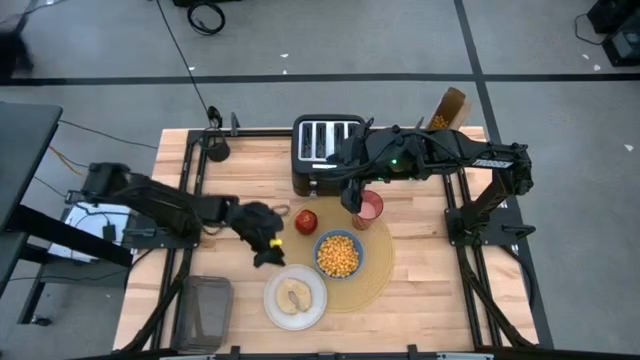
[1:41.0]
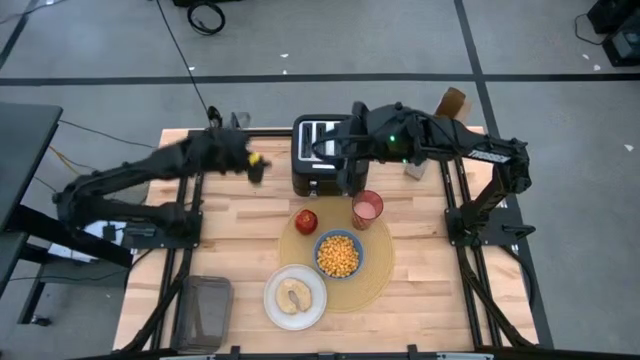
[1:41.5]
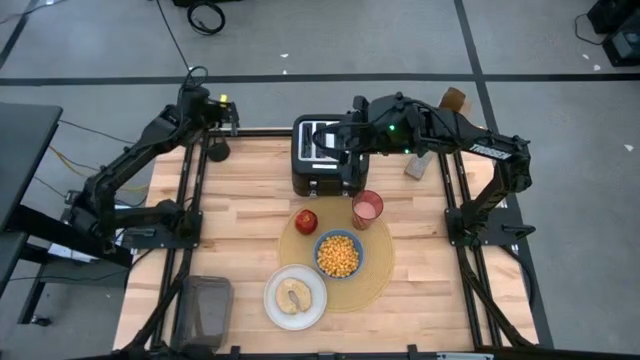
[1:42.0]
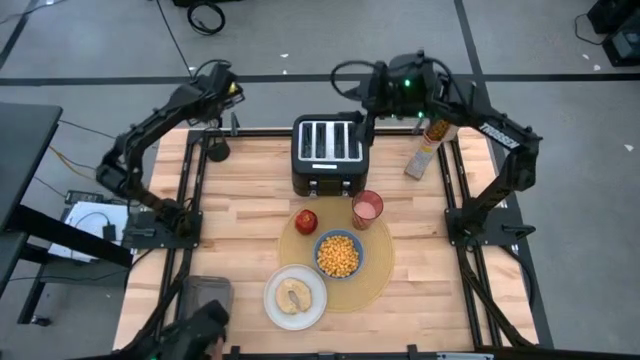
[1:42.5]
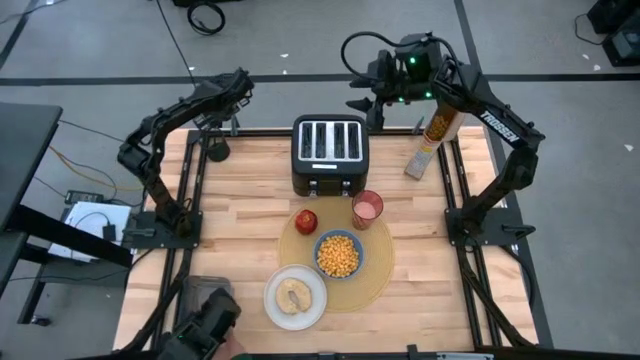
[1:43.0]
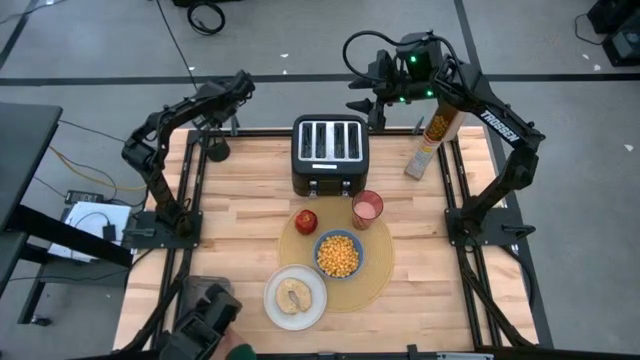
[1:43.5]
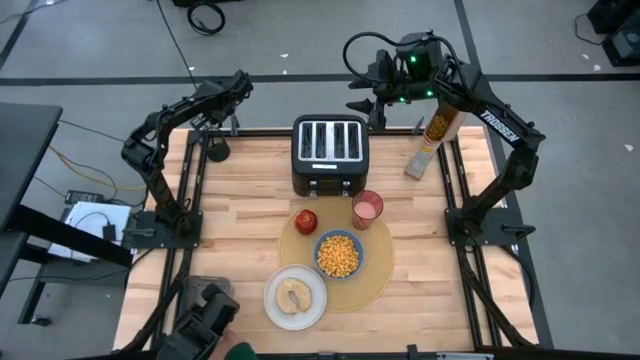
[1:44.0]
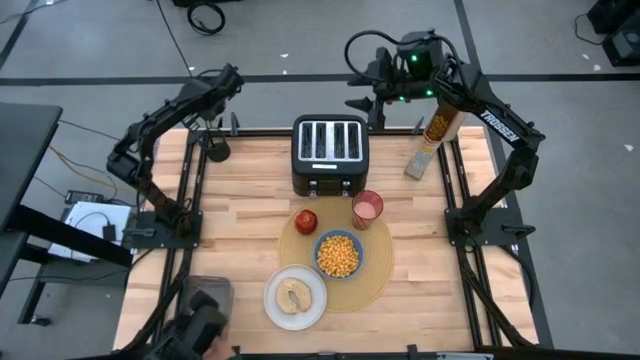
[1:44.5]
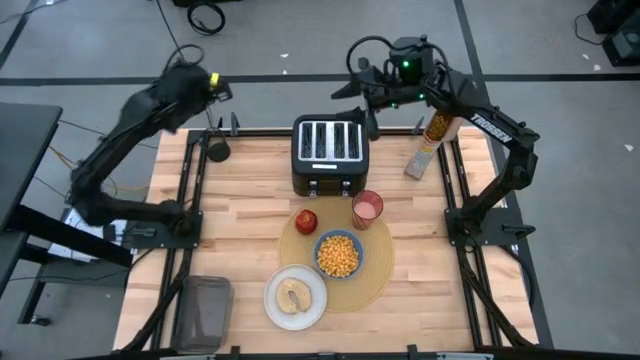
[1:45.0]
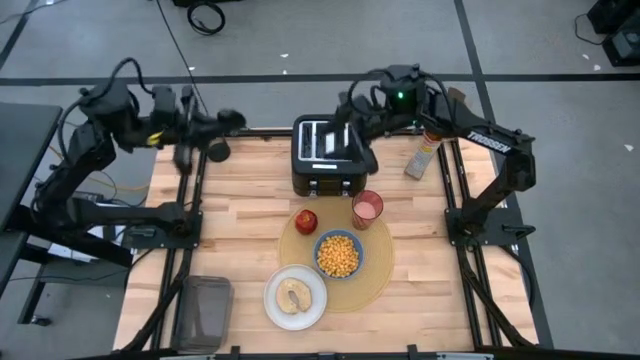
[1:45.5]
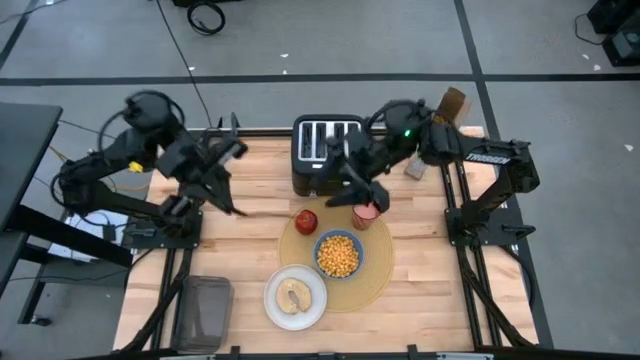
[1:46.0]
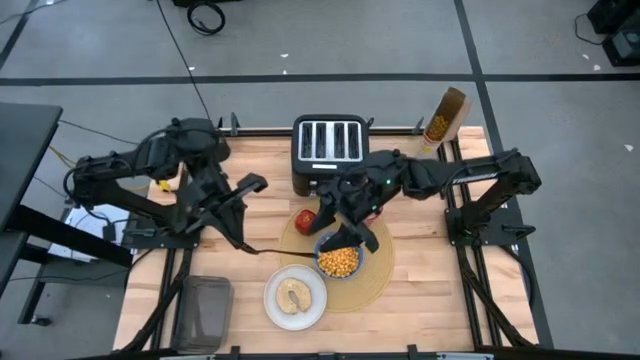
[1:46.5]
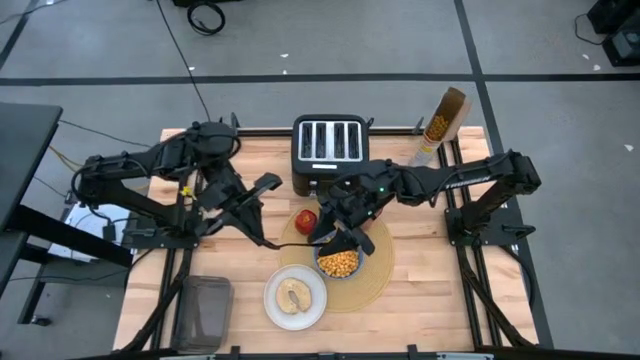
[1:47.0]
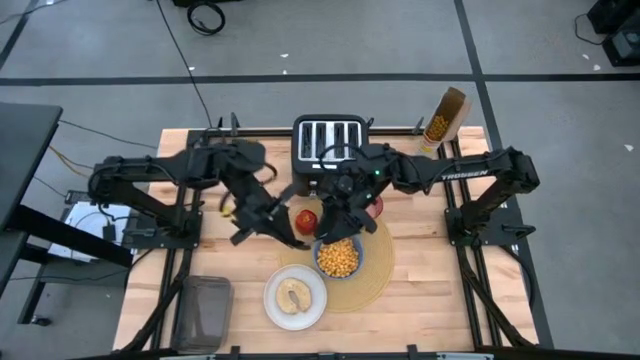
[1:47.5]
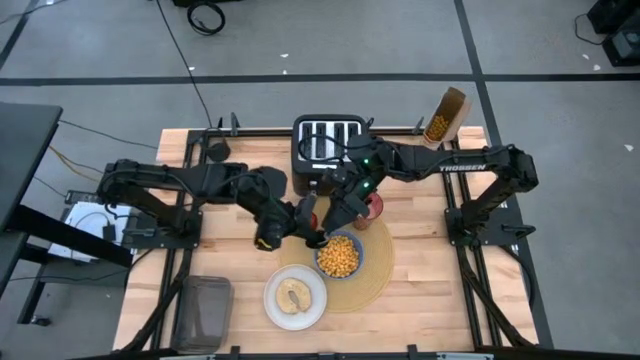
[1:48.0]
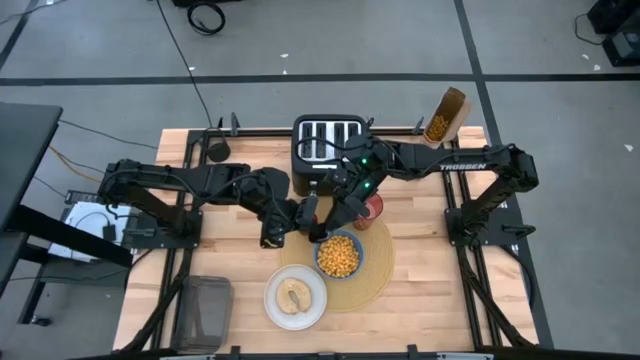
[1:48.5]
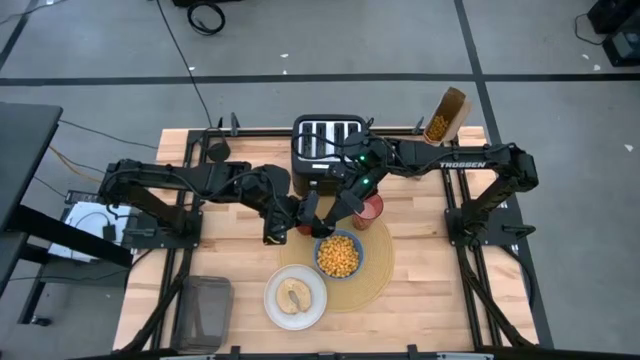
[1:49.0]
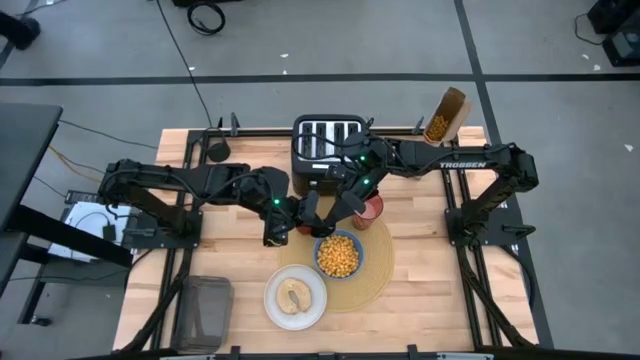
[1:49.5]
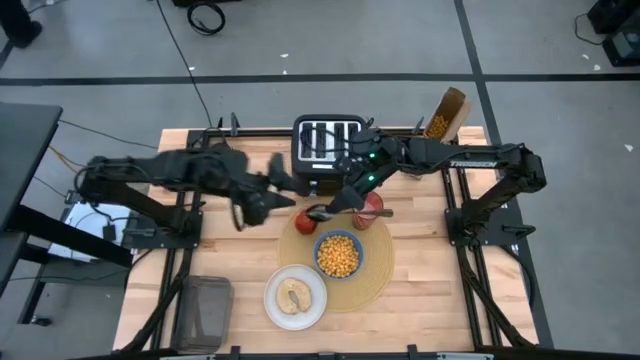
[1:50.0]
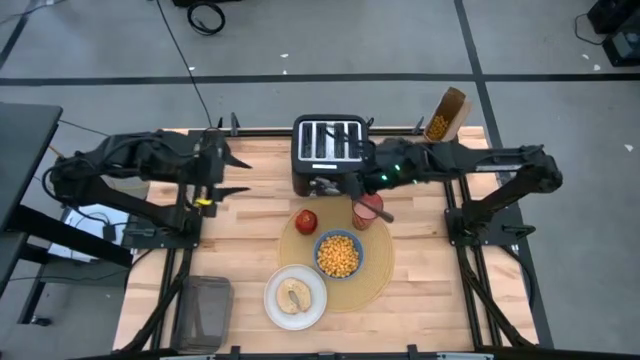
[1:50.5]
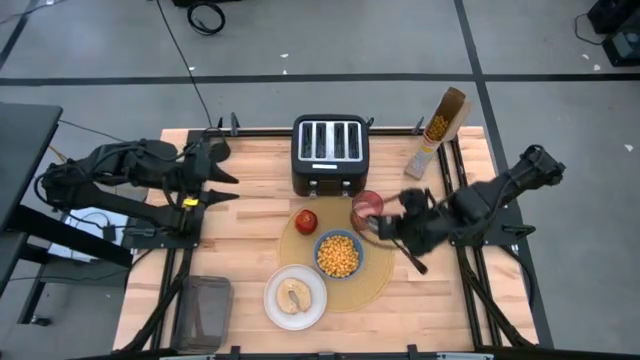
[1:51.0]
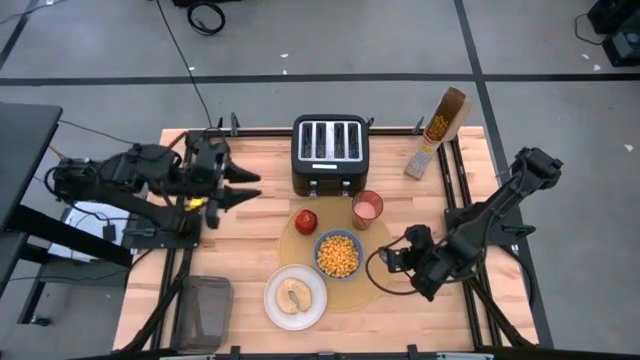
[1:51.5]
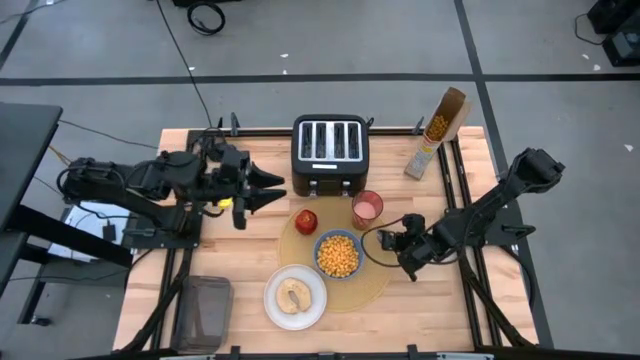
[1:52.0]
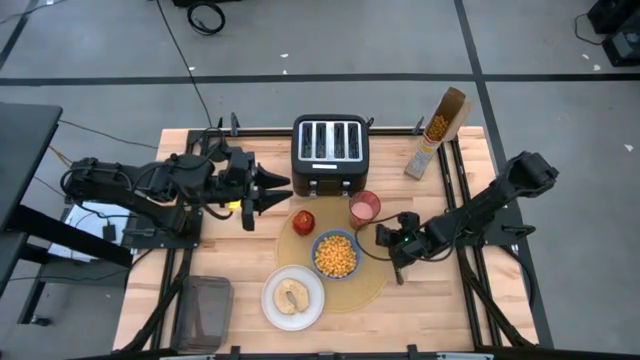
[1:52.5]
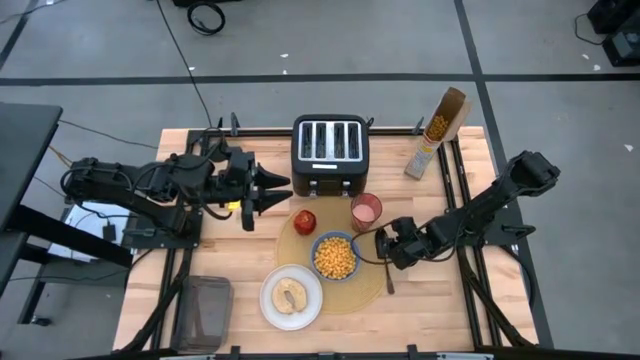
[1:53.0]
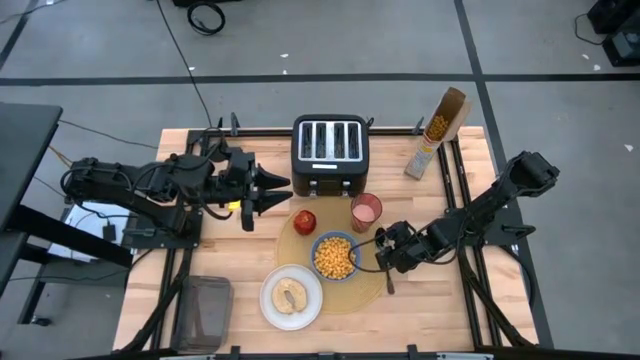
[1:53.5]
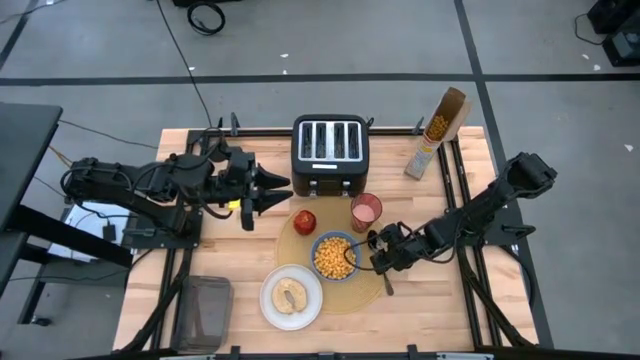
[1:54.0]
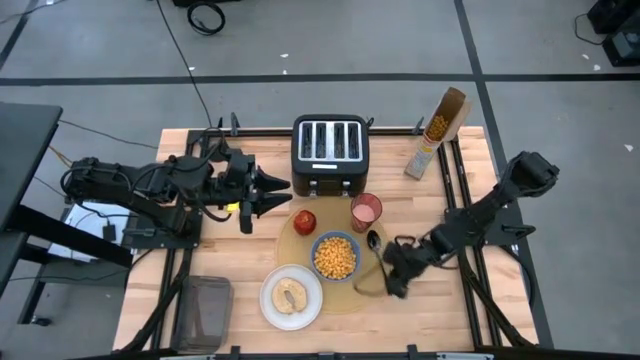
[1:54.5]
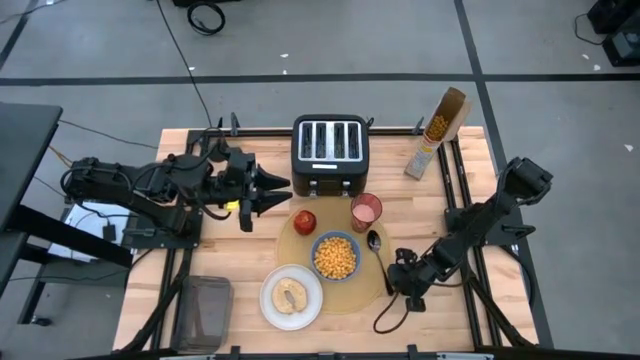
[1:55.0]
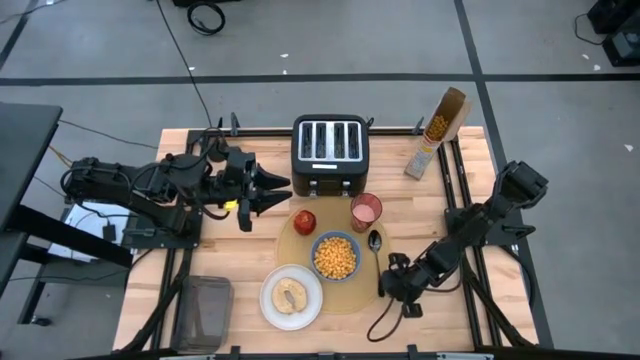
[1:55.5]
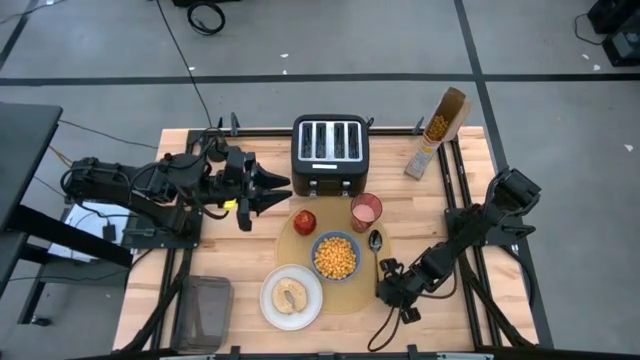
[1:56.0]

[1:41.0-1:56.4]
Task: Arrange a breakfast setting
Put the spoon on the yellow tablemat to the right of the blue bowl

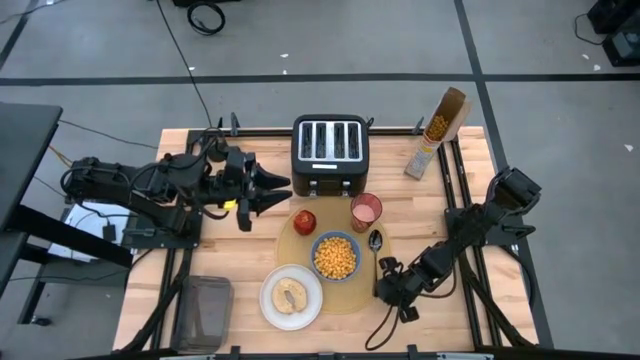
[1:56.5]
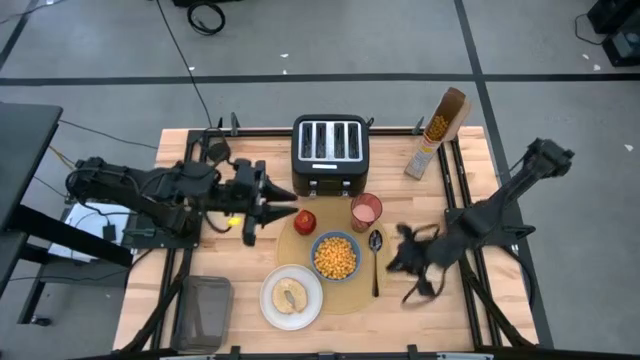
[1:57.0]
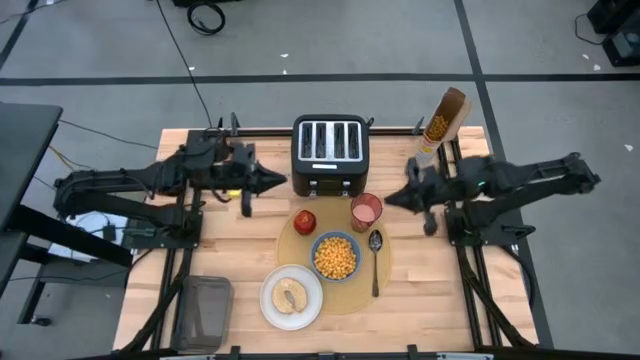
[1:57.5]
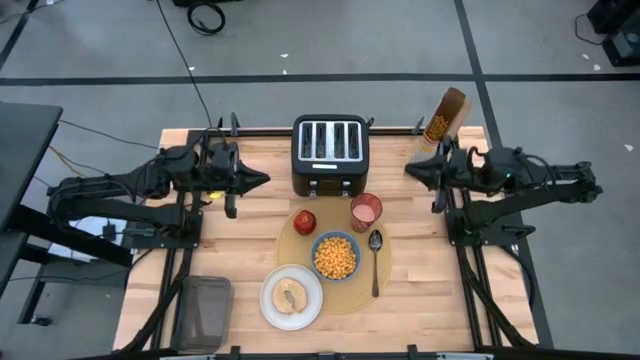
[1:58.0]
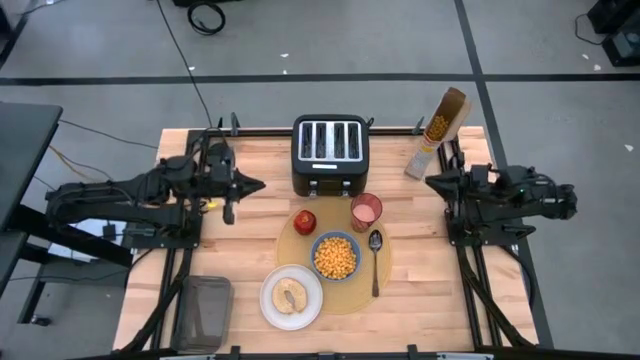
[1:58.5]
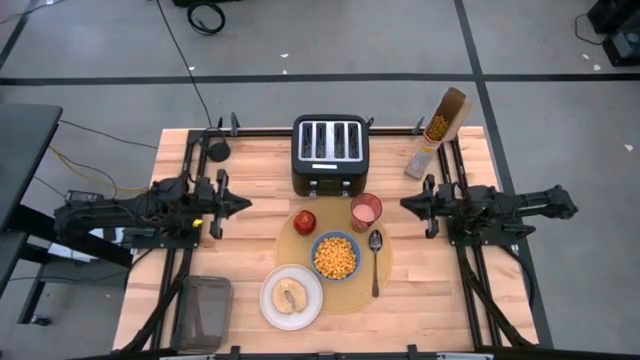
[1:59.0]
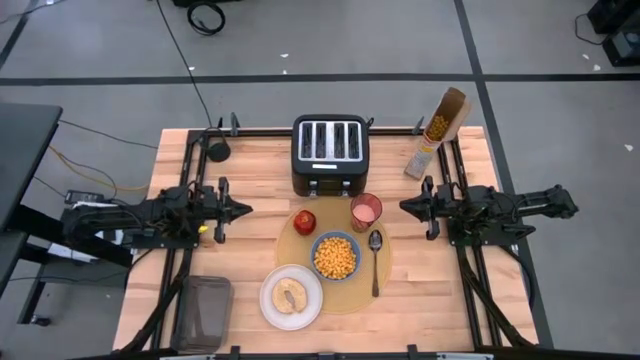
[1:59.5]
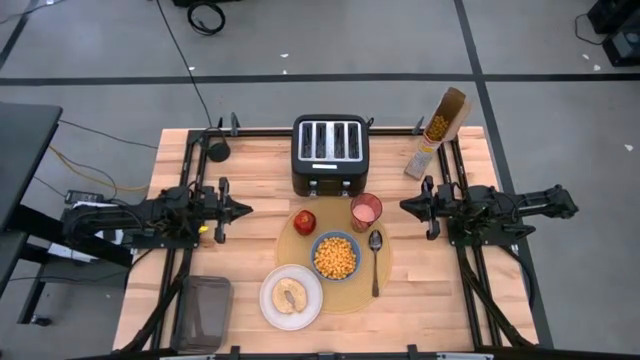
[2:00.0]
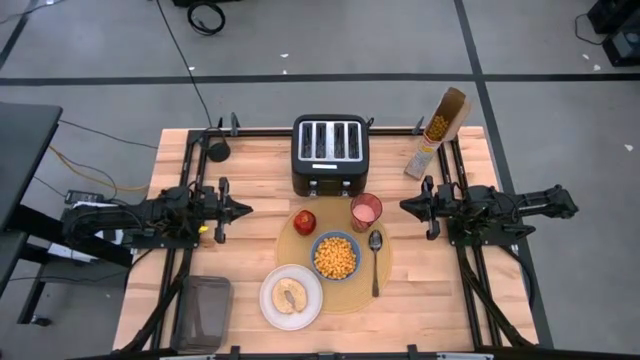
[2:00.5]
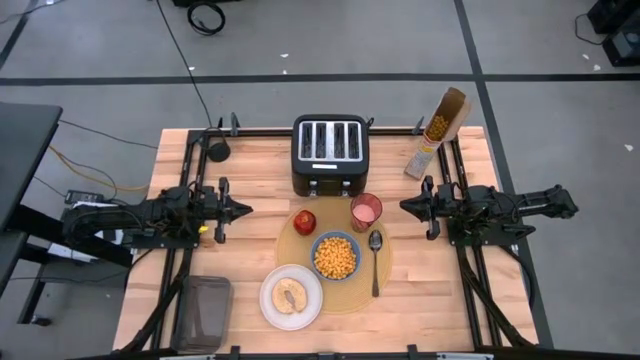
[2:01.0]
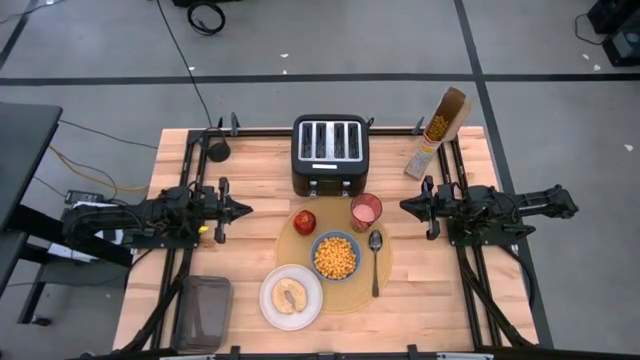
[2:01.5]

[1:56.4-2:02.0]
Return to Home Position

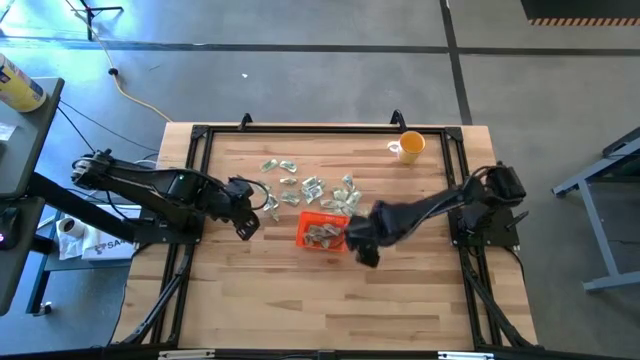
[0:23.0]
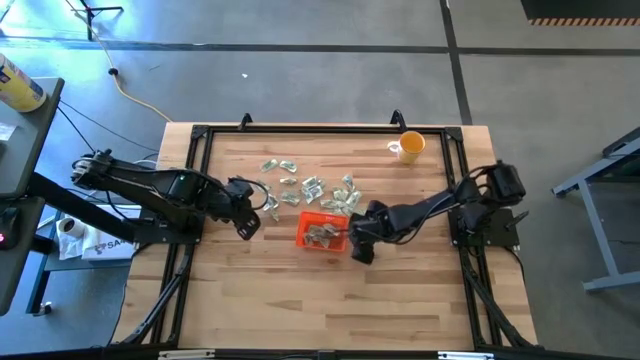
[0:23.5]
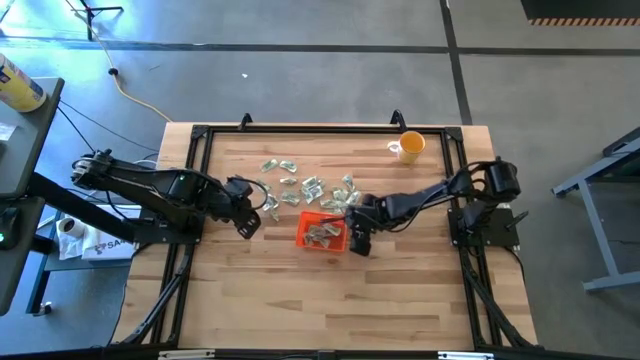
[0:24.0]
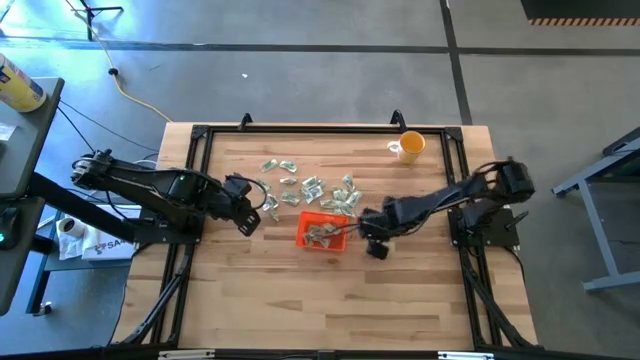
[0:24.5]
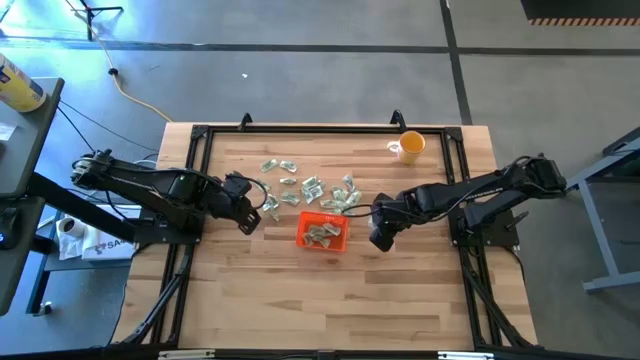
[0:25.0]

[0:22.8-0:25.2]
Task: Pick and place Stevia / Truvia into bins
Put the stevia packet into the orange bin
